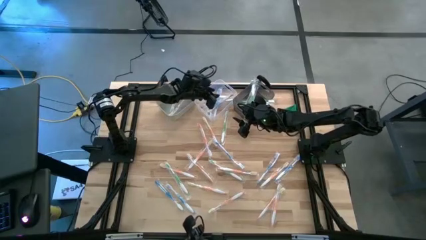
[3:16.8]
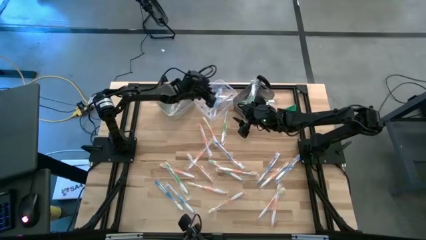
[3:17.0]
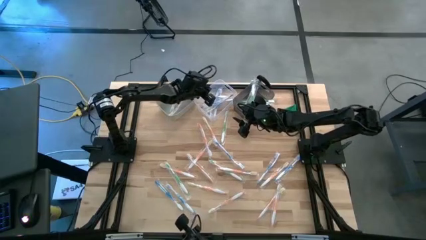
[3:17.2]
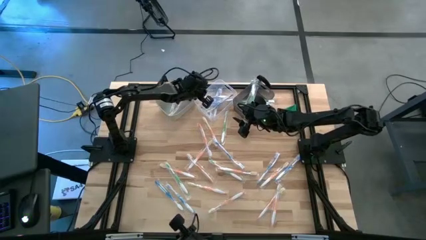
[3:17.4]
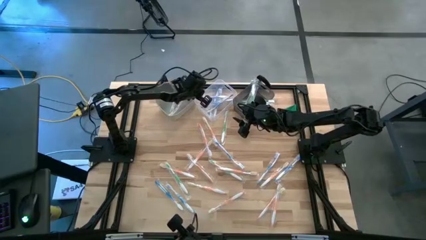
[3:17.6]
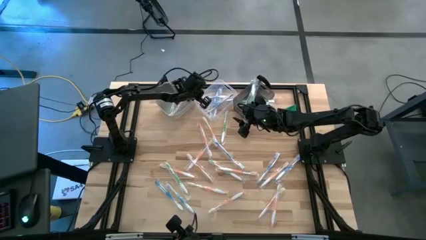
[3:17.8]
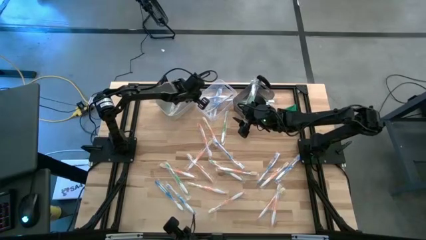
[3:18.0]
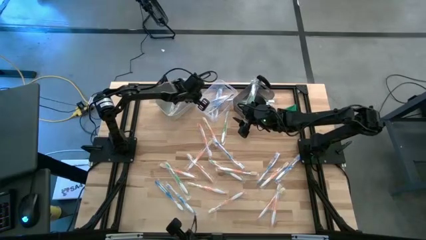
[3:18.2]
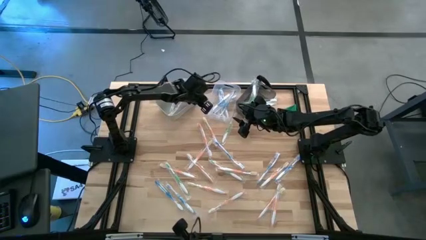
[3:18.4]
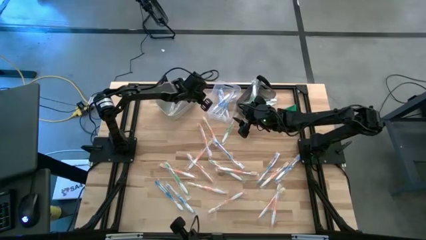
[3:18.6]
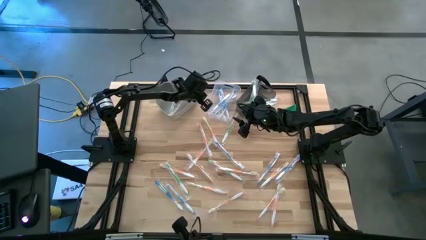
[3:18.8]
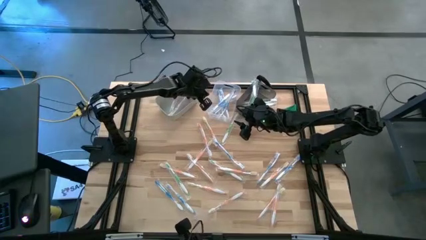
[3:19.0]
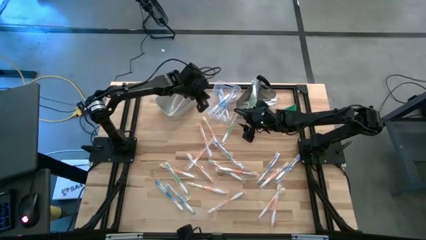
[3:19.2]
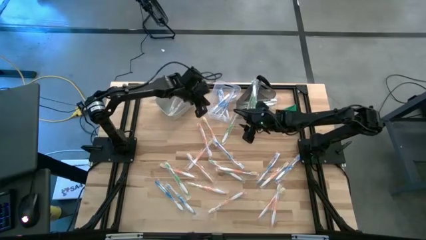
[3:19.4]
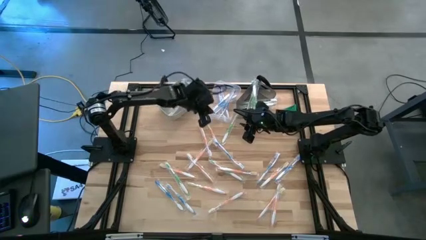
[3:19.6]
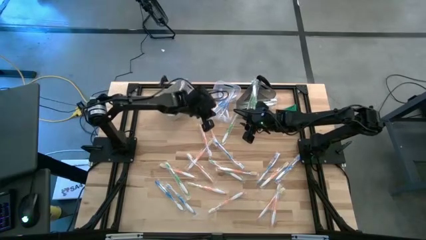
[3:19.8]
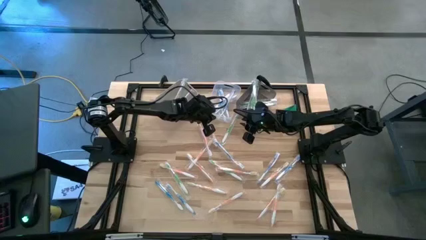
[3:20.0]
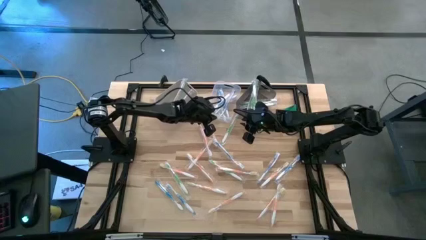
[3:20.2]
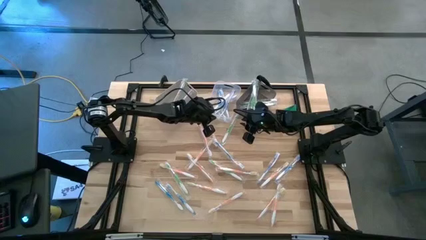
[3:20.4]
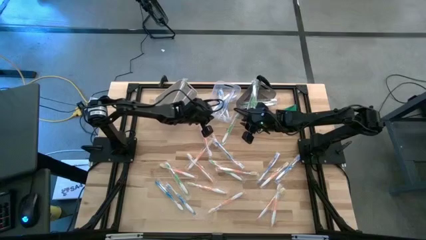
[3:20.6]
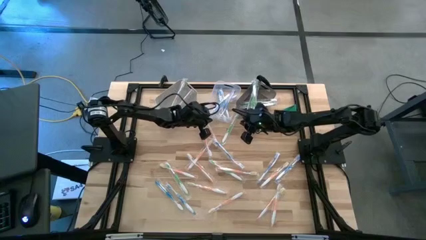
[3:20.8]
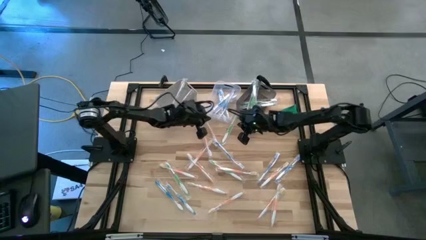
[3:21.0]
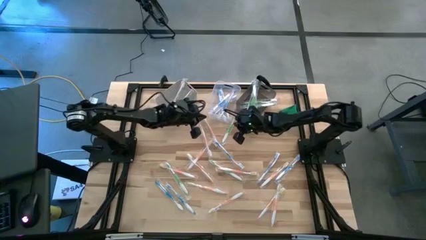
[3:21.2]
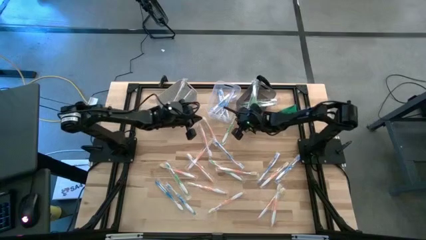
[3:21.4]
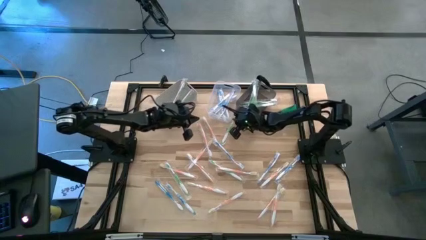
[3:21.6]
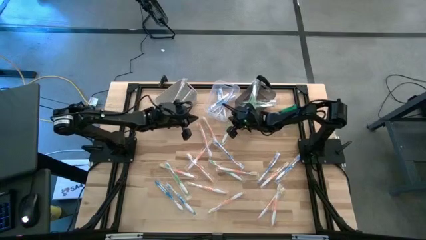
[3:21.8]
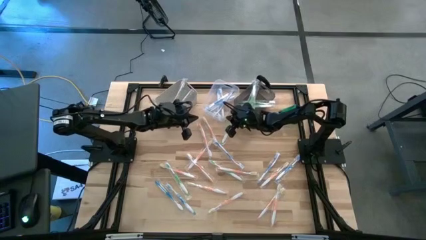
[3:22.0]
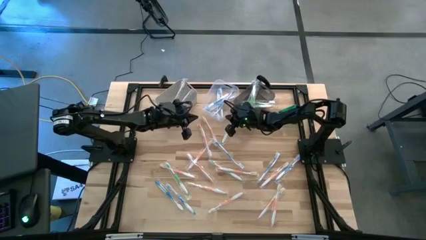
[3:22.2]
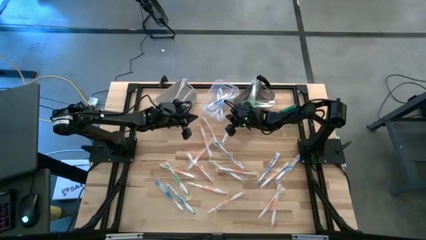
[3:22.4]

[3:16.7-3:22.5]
Task: Pick & Place Toothbrushes
Adjust the transparent bin

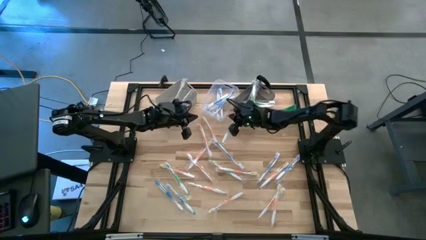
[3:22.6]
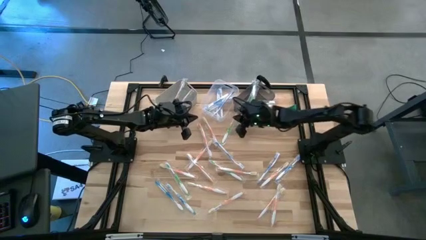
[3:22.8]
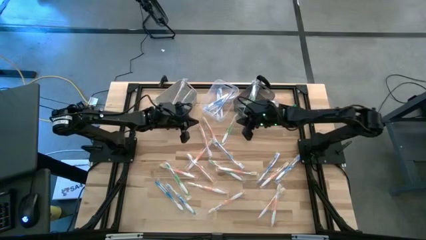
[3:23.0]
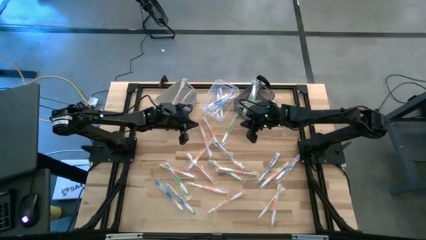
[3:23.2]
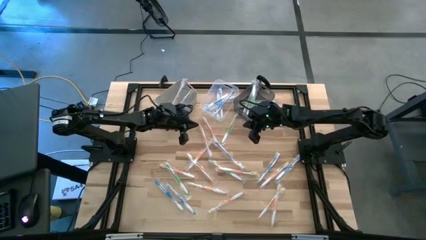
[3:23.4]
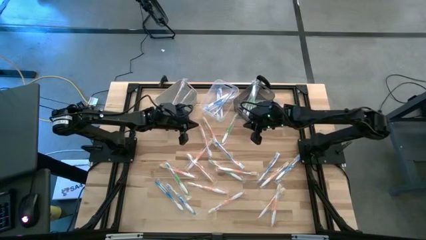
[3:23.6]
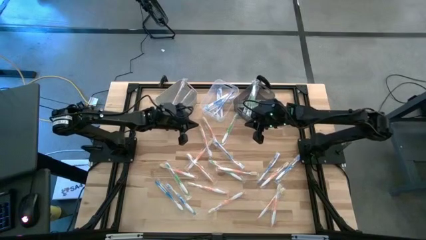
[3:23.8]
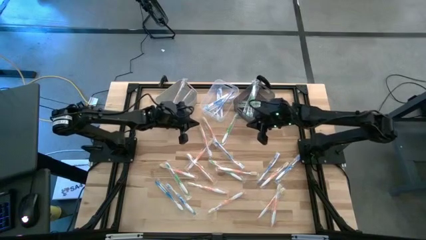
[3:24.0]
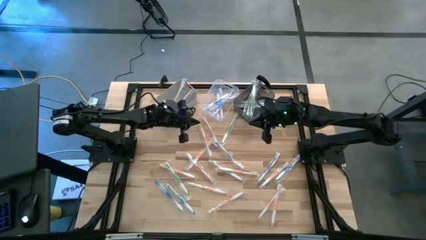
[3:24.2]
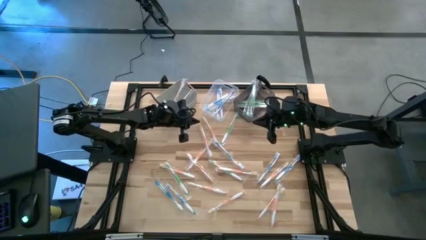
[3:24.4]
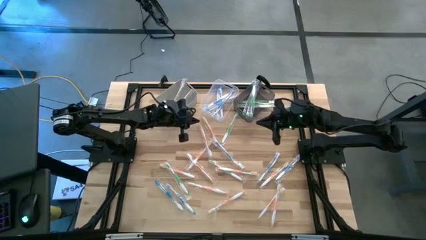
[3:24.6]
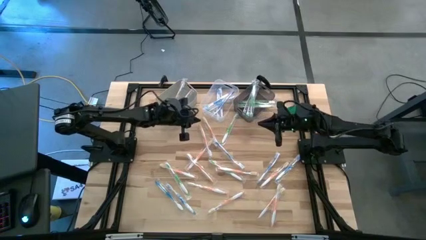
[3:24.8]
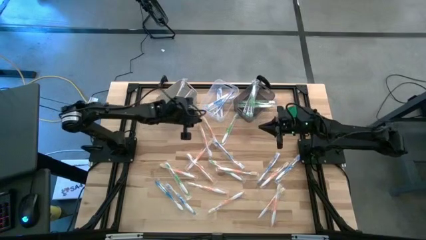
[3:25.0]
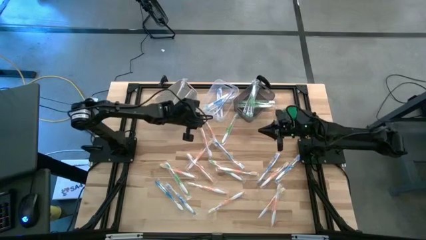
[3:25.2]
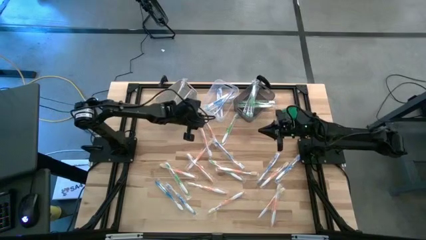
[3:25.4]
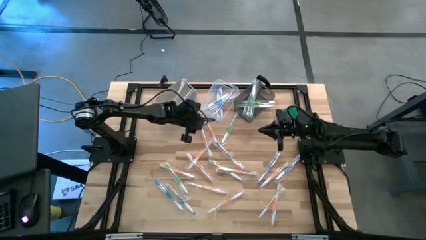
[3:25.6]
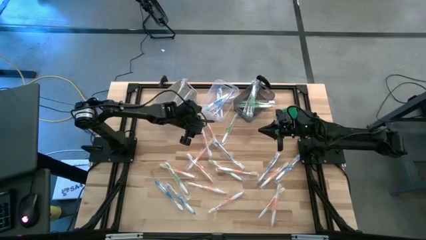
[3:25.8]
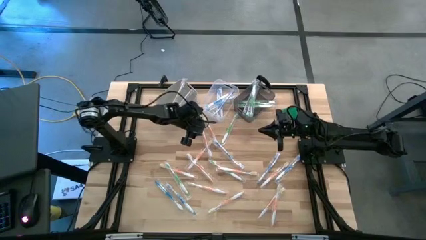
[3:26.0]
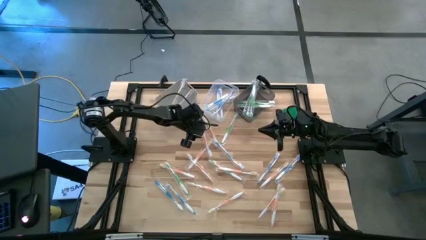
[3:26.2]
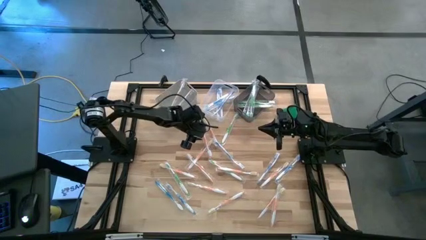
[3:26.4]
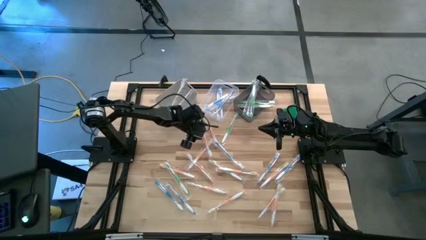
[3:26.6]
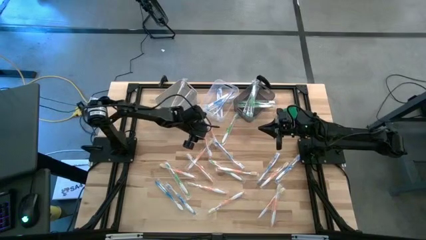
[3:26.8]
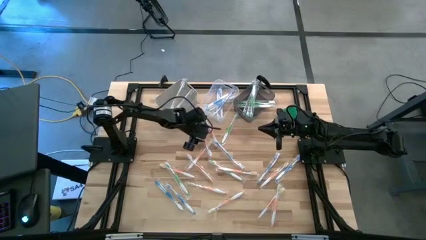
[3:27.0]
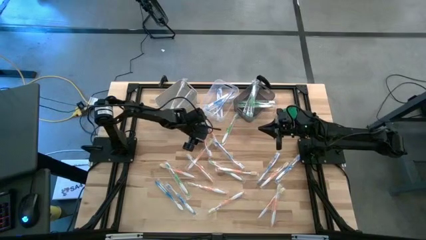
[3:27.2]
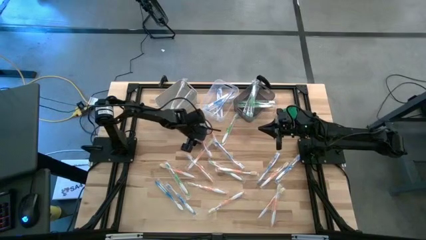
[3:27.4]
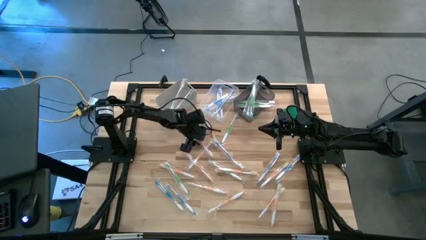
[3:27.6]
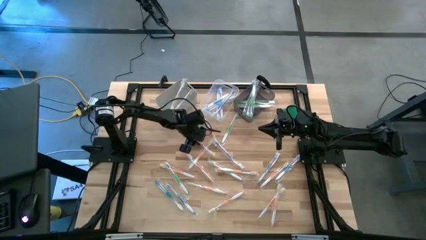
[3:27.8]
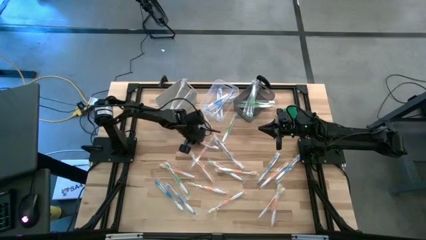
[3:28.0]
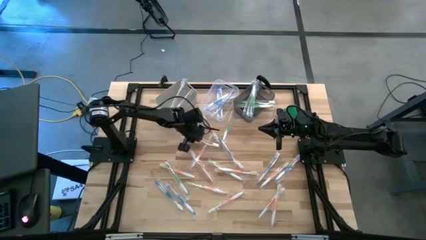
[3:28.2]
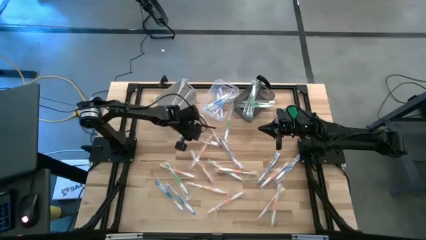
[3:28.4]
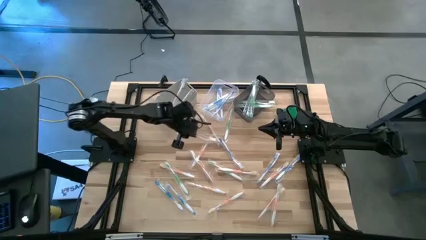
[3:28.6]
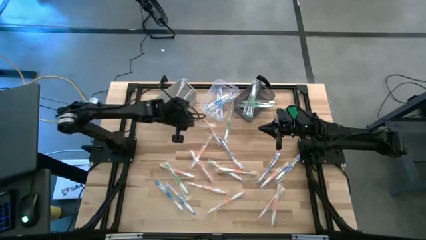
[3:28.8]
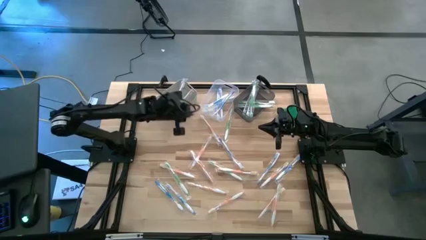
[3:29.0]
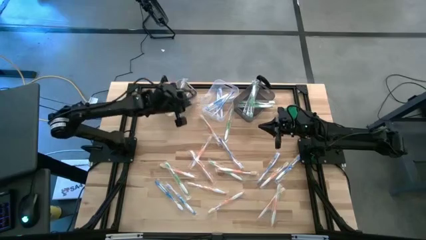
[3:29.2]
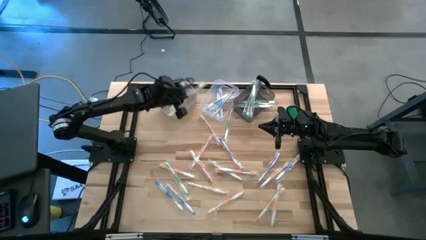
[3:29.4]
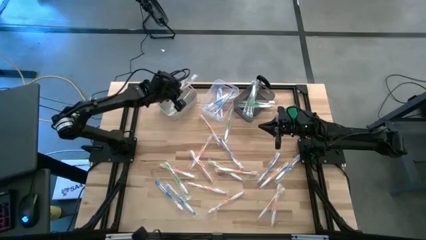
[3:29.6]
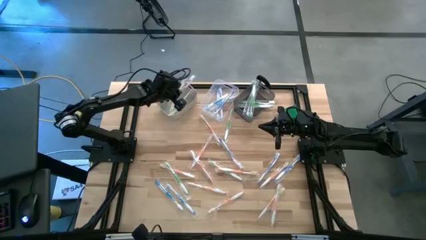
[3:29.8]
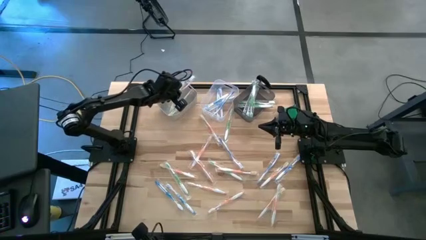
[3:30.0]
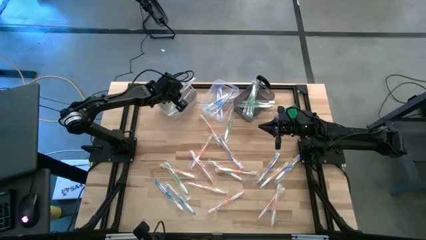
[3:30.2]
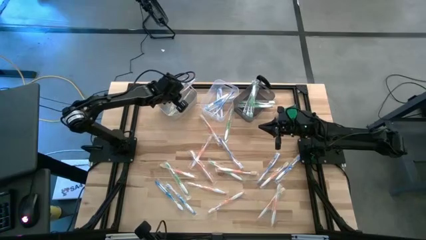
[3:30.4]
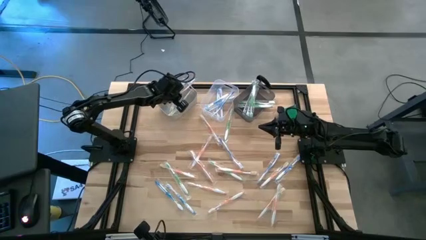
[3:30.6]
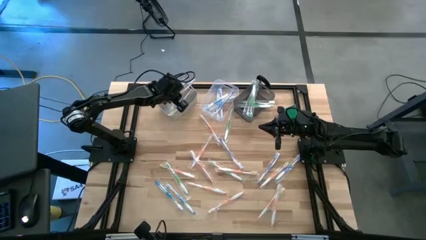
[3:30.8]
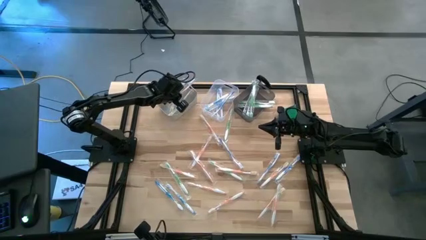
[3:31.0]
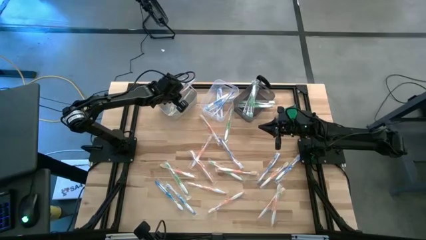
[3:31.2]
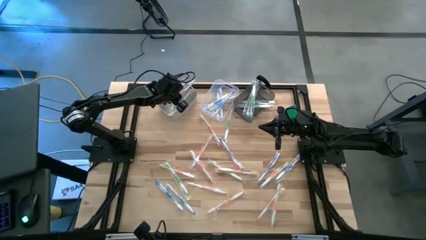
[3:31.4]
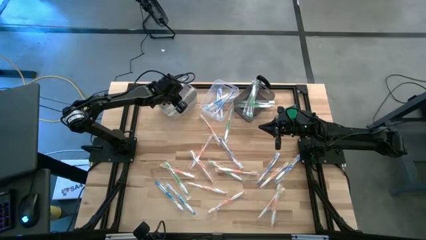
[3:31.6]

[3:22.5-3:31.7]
Put the orange toothbrush into the white bin

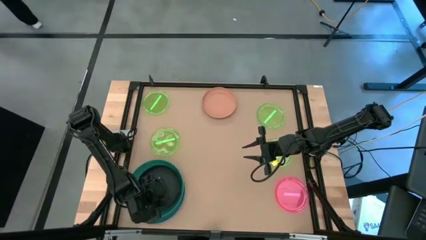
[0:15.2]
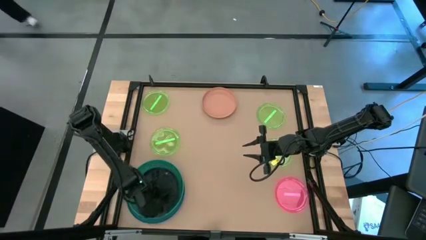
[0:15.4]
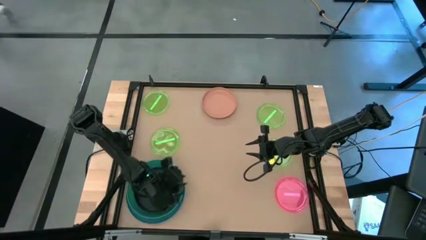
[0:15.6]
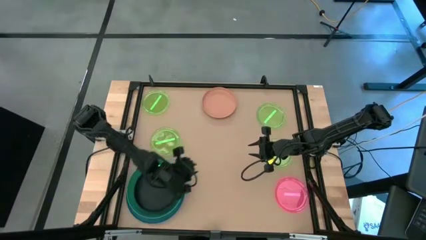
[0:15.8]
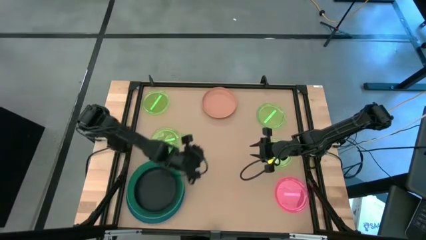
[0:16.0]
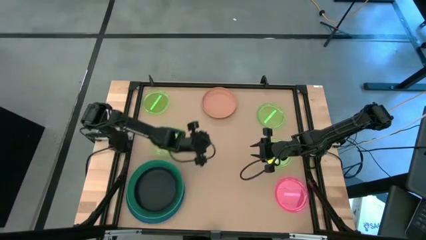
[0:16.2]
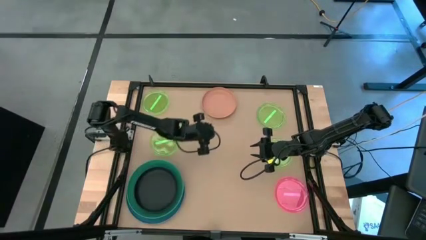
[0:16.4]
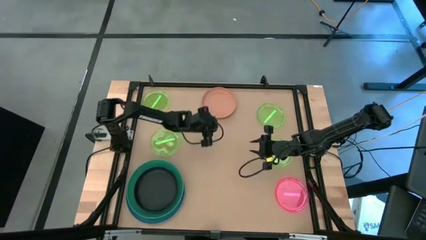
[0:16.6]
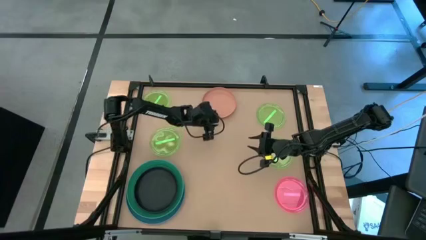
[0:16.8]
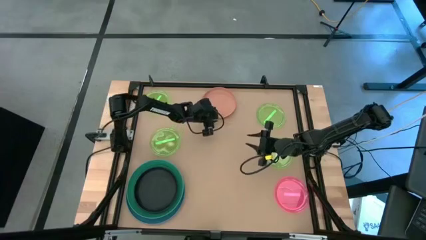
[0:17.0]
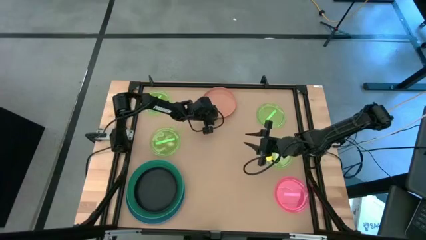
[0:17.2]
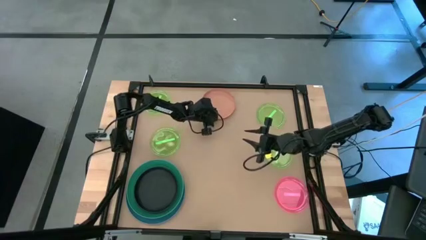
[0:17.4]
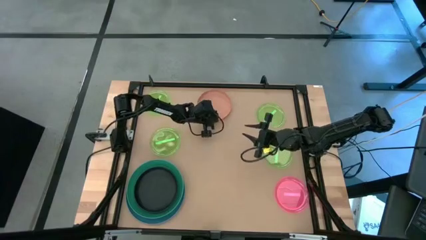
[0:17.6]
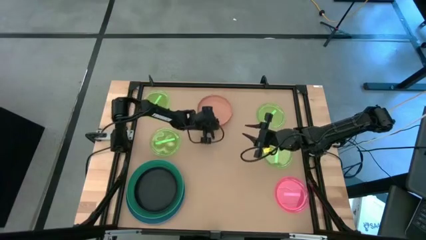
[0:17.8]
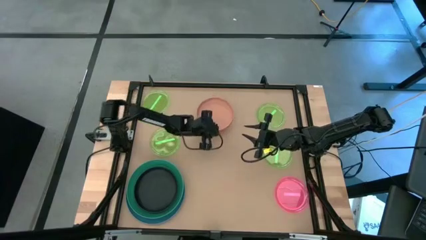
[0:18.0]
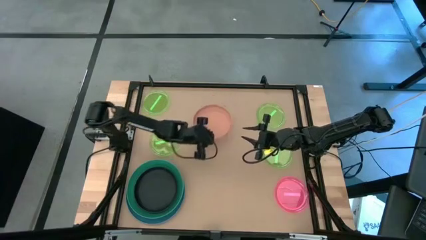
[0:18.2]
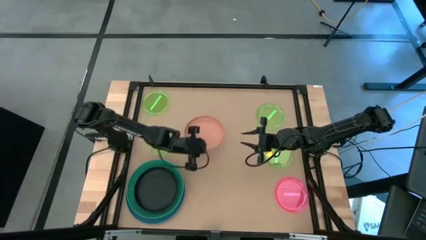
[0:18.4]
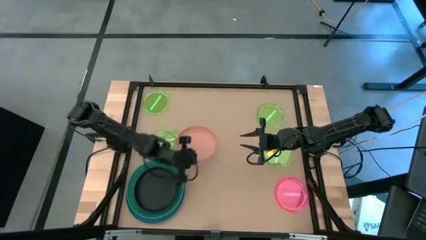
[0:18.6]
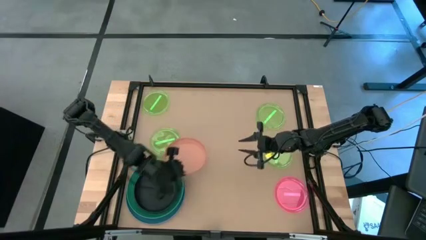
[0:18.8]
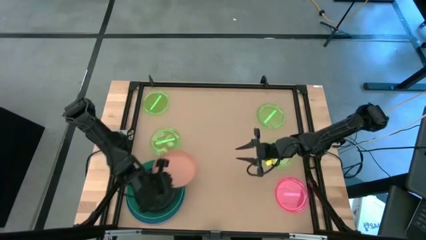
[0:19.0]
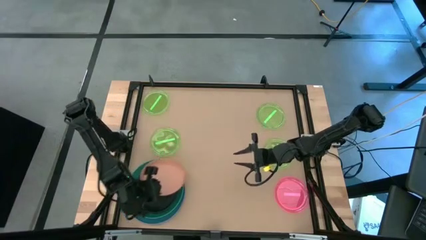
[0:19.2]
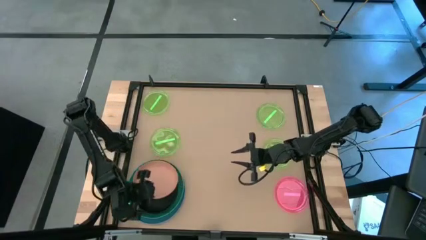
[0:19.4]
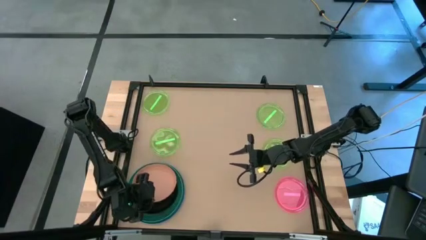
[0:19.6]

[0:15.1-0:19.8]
Task: Stack plastic plates
Stack the orange plate on top of the black plate
